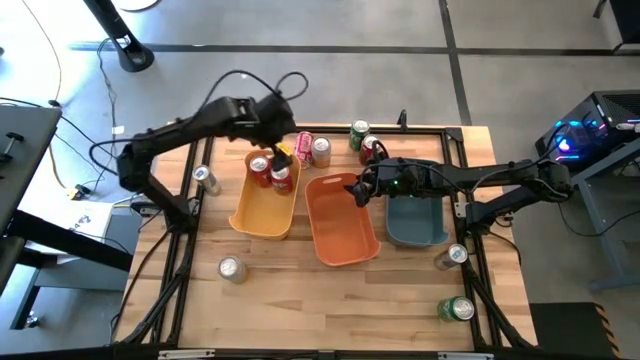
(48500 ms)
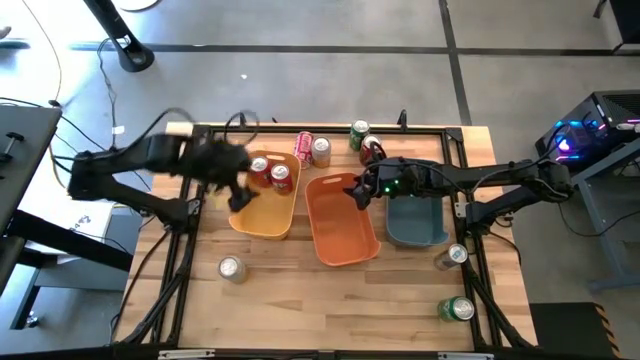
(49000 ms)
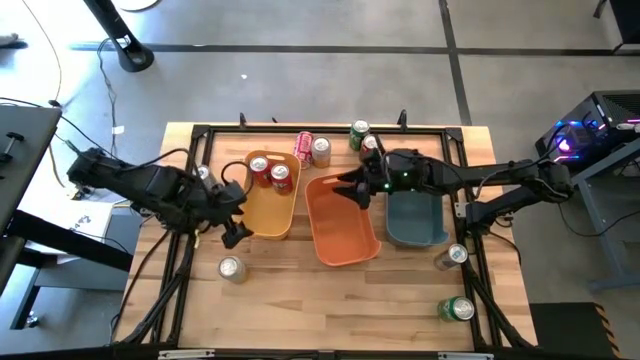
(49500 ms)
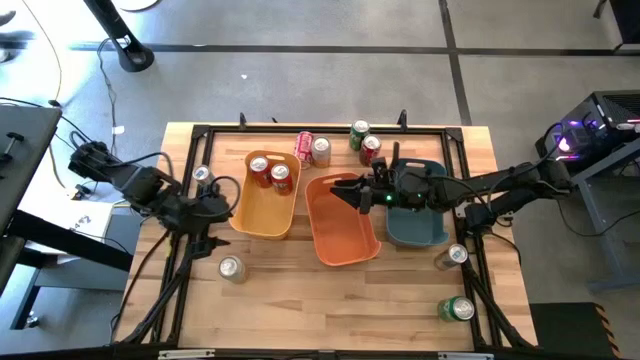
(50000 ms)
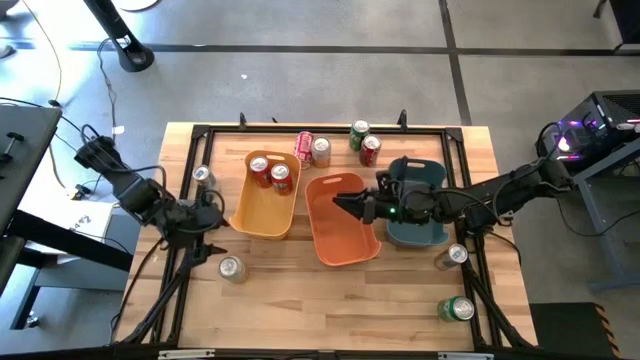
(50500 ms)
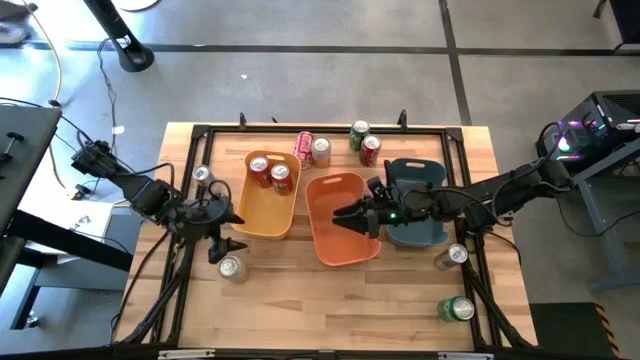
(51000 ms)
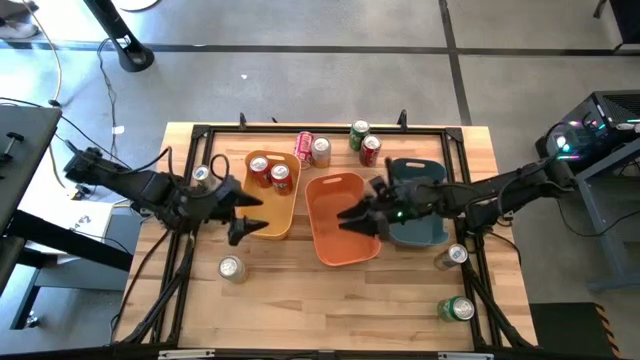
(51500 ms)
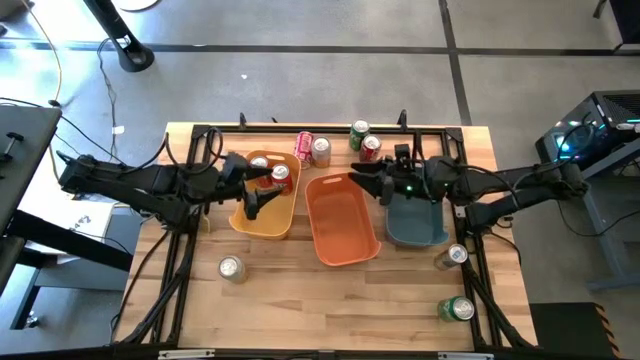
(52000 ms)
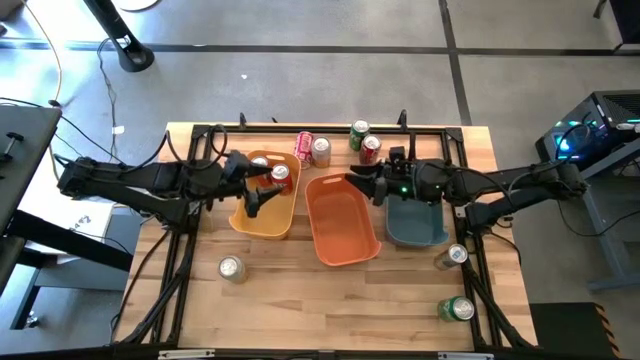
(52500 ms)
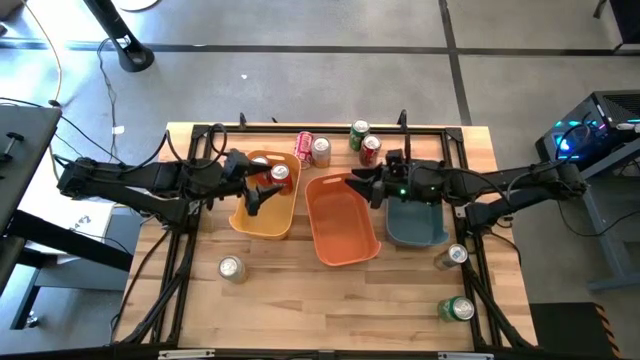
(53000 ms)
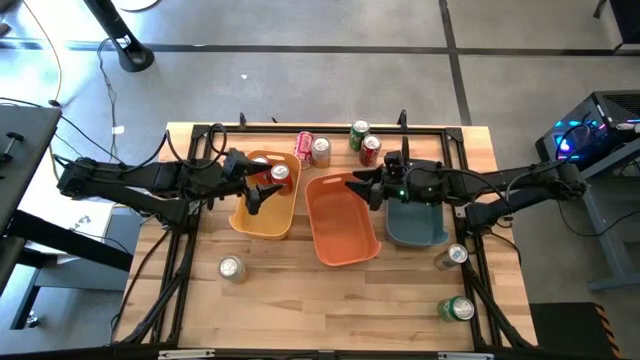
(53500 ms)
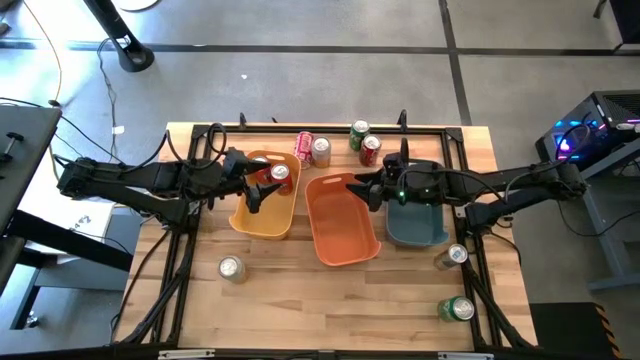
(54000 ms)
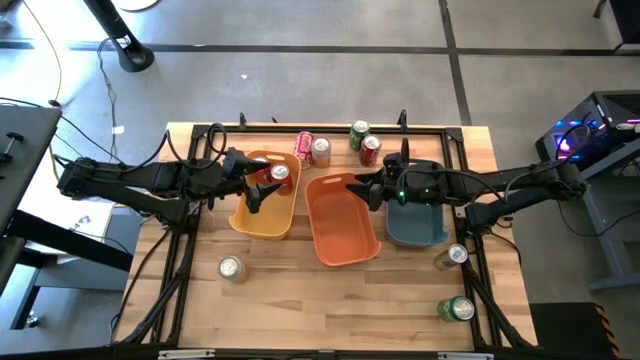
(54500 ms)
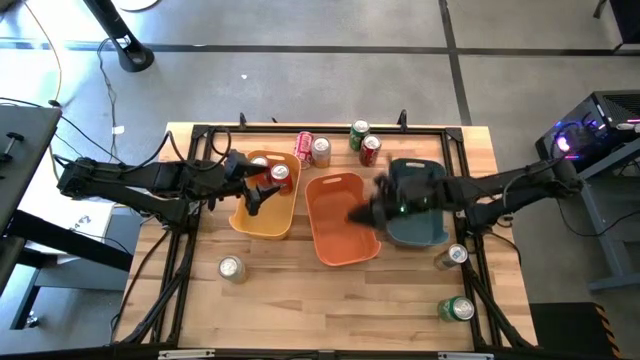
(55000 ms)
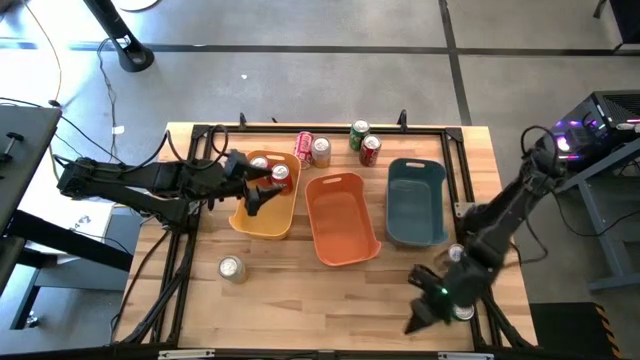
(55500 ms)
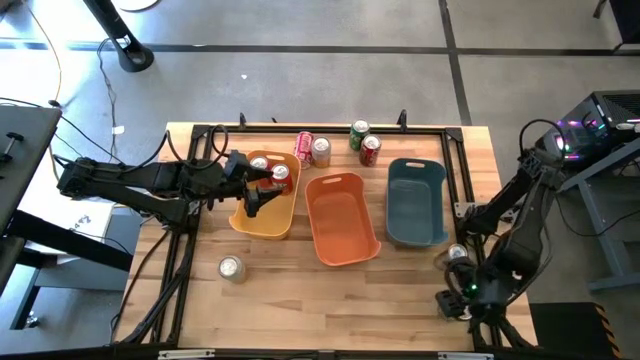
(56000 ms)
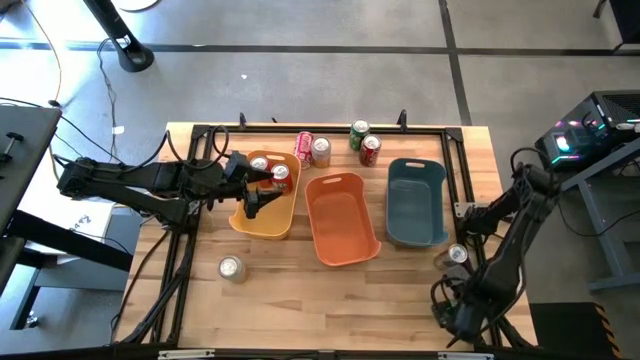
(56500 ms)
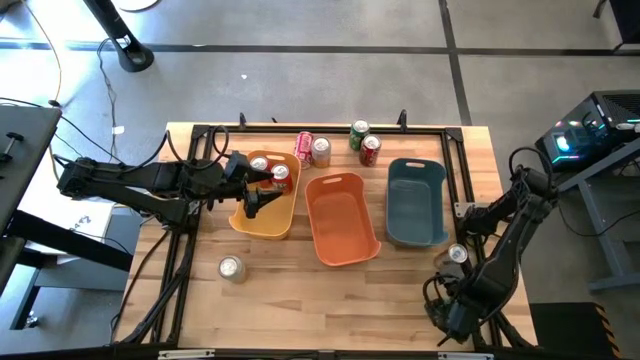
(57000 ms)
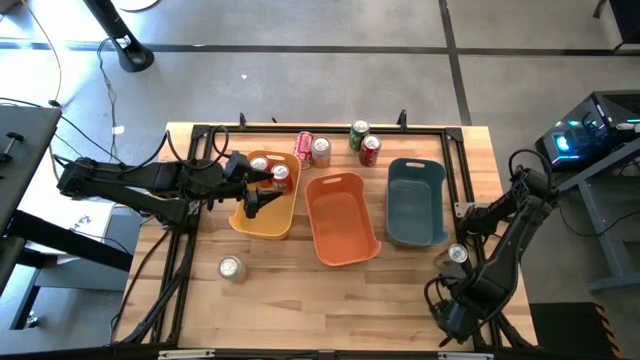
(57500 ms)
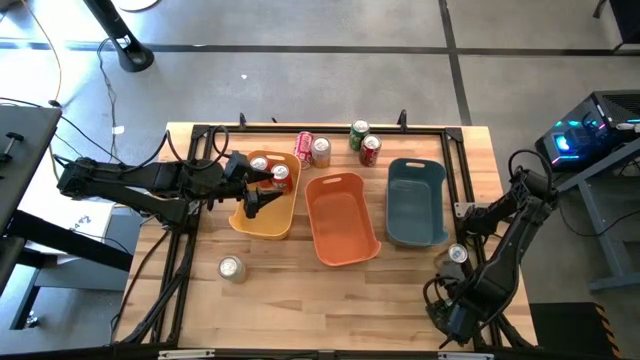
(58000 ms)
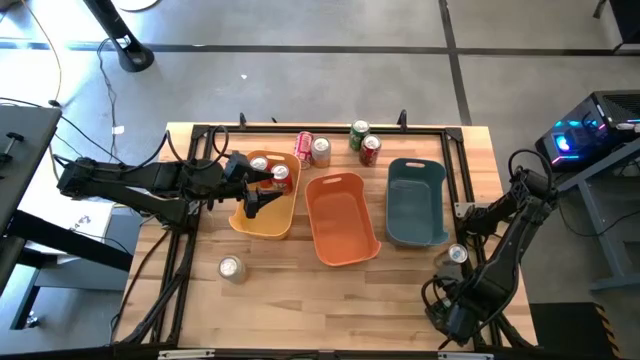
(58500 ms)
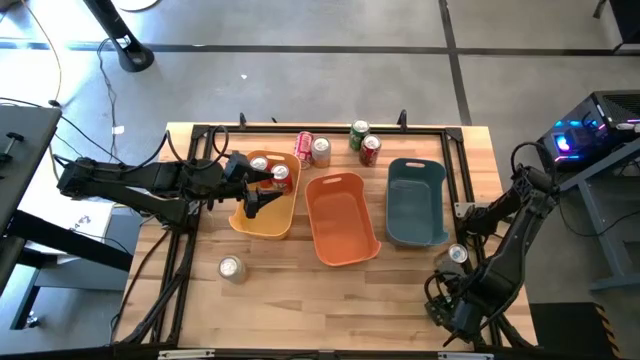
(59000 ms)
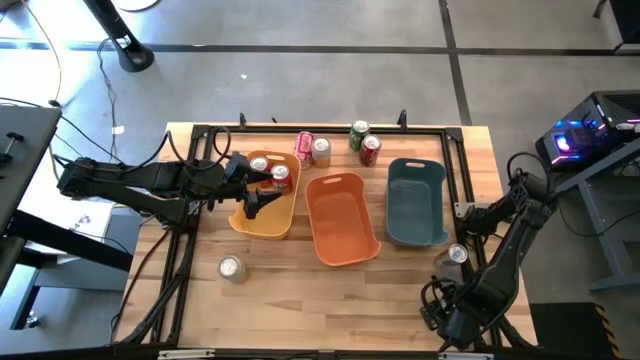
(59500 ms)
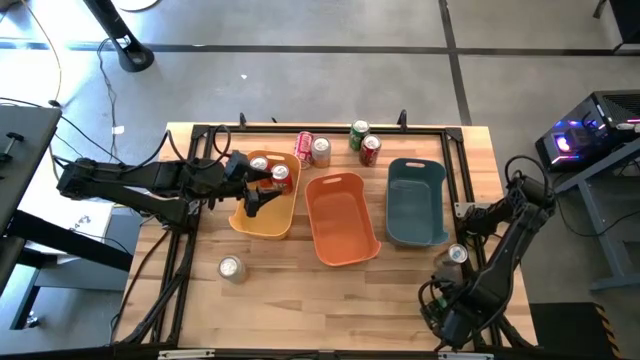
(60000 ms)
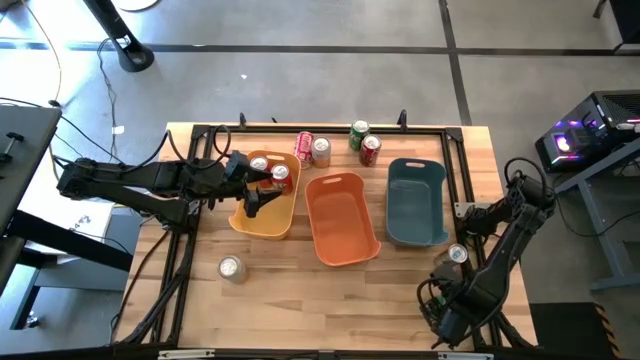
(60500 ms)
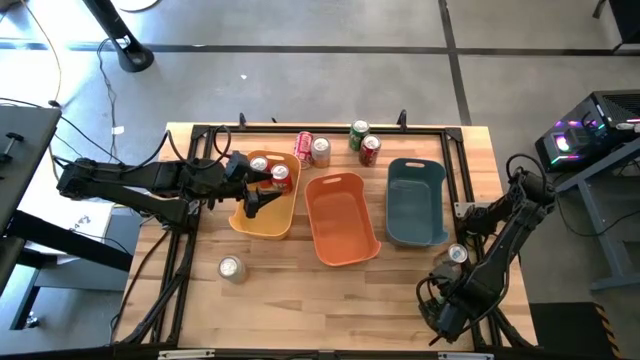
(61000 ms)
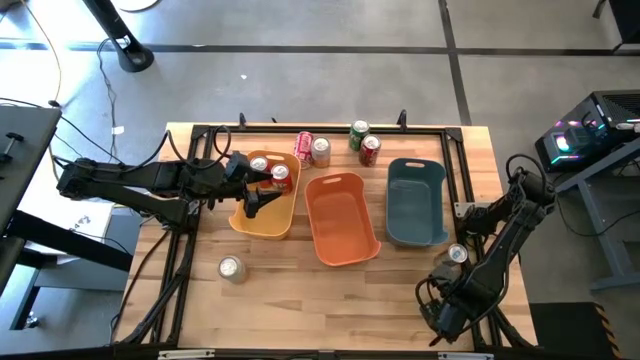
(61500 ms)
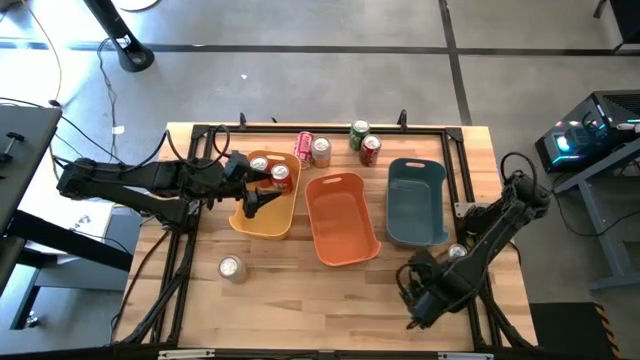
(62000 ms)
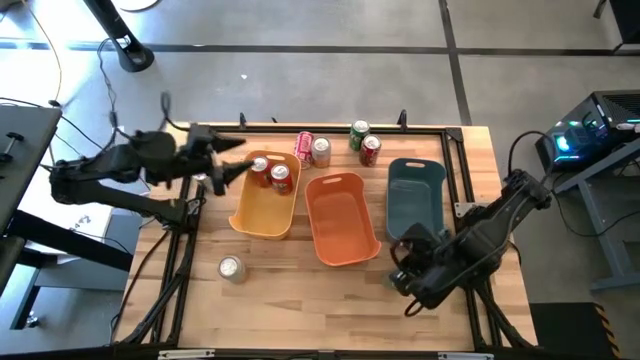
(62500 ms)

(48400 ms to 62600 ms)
Task: Sort soda cans
Put the bottom green soda can into the yellow bin

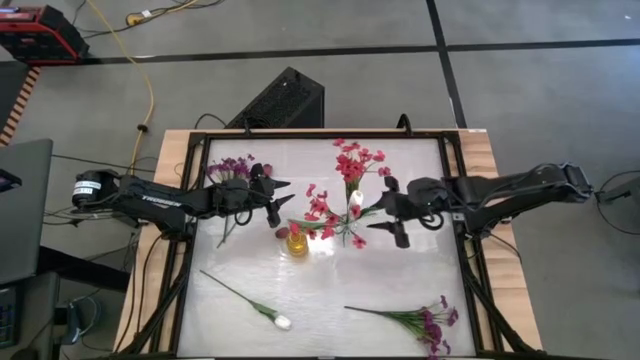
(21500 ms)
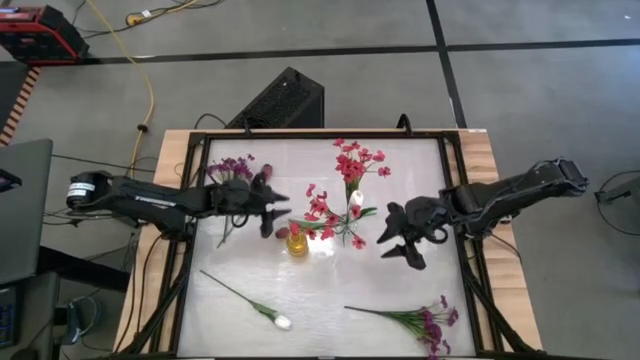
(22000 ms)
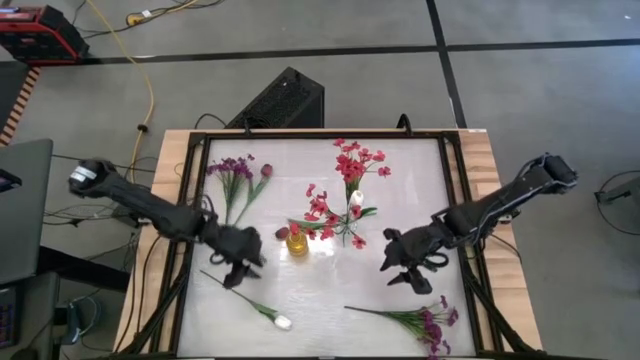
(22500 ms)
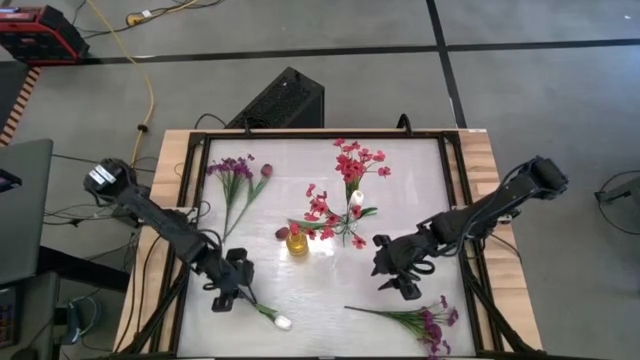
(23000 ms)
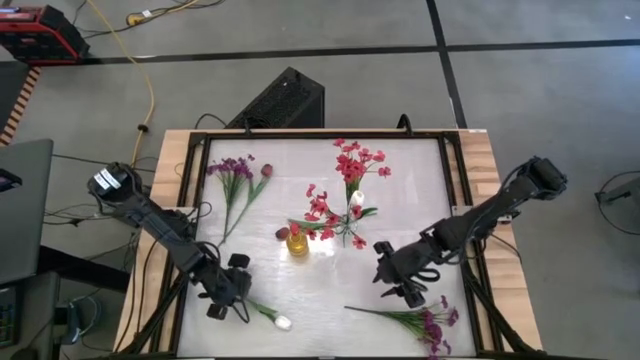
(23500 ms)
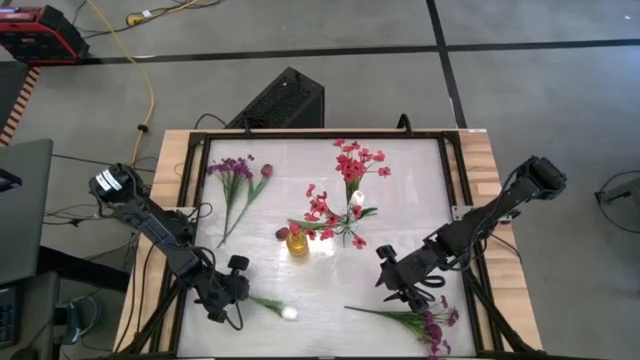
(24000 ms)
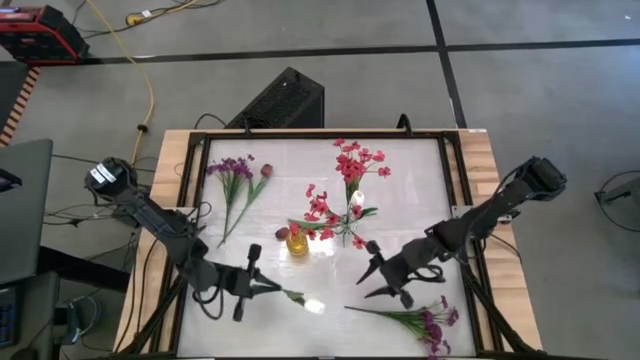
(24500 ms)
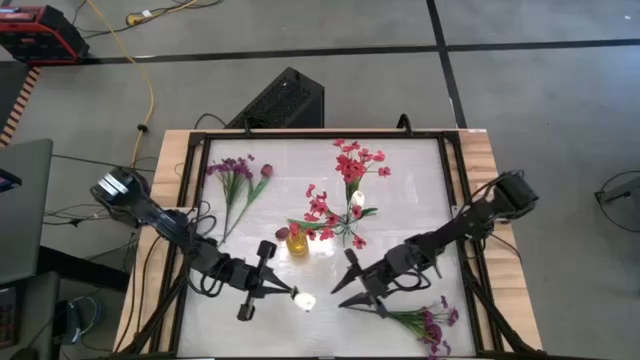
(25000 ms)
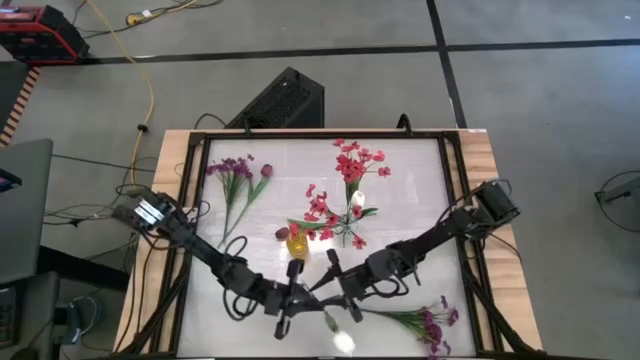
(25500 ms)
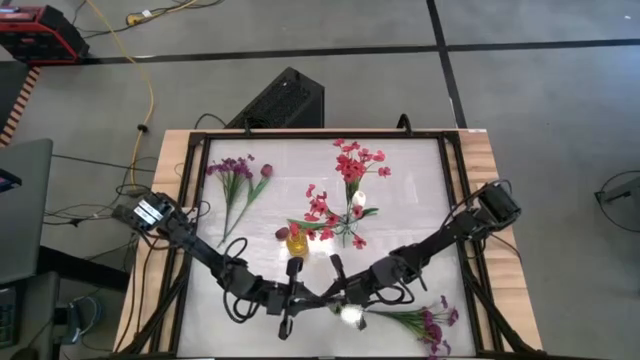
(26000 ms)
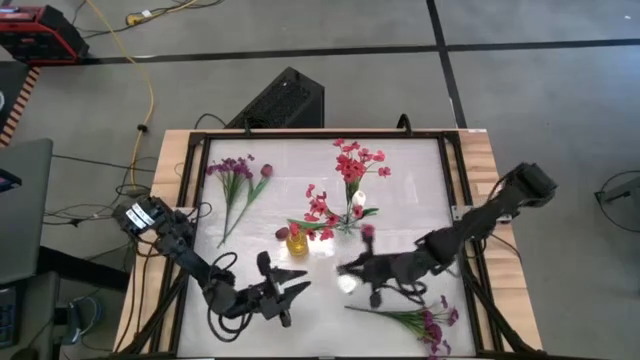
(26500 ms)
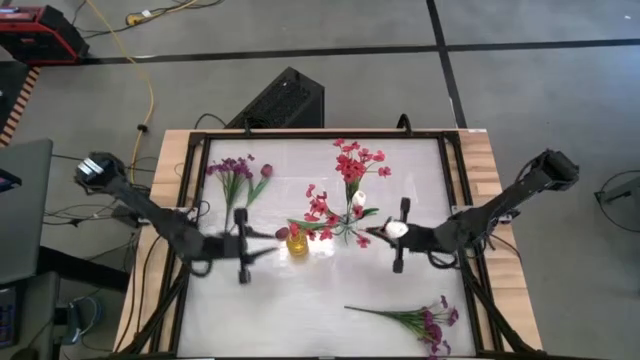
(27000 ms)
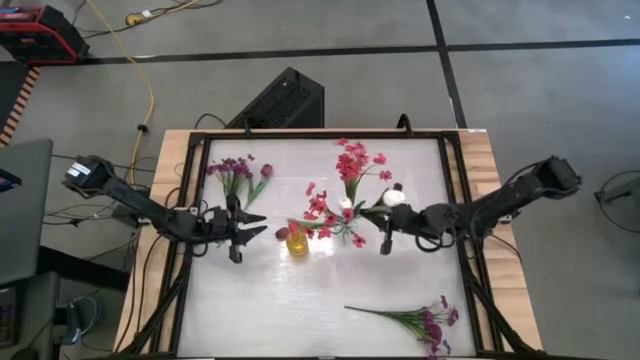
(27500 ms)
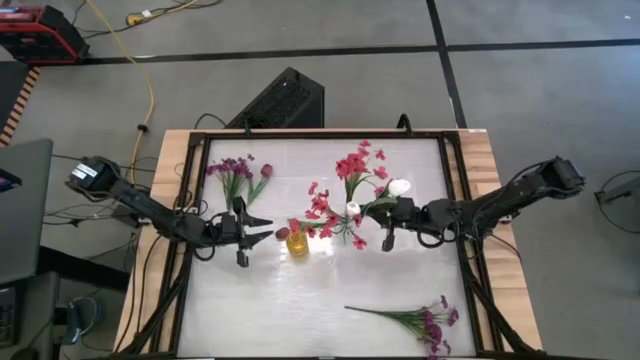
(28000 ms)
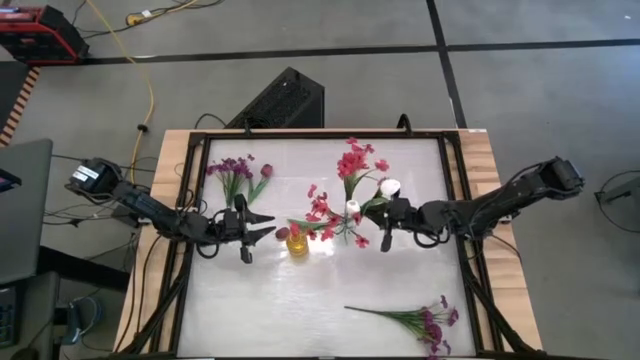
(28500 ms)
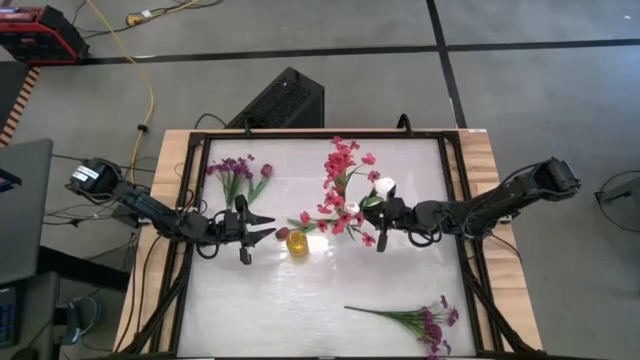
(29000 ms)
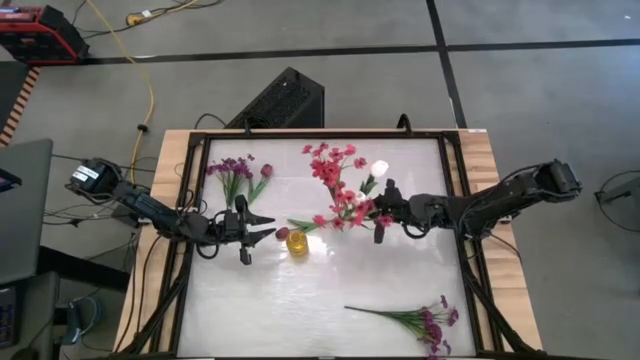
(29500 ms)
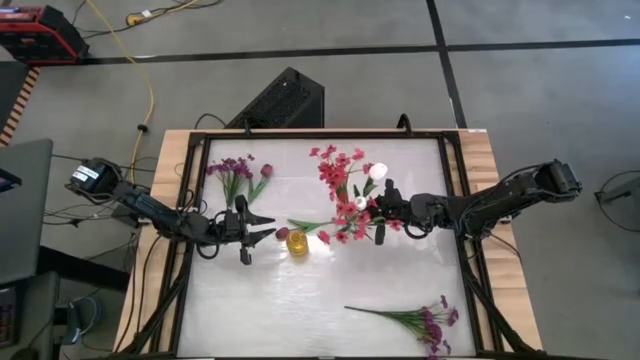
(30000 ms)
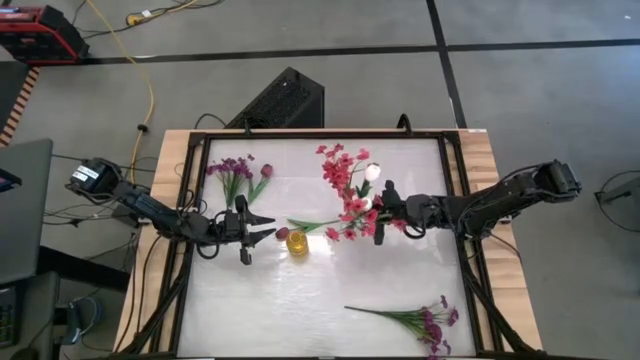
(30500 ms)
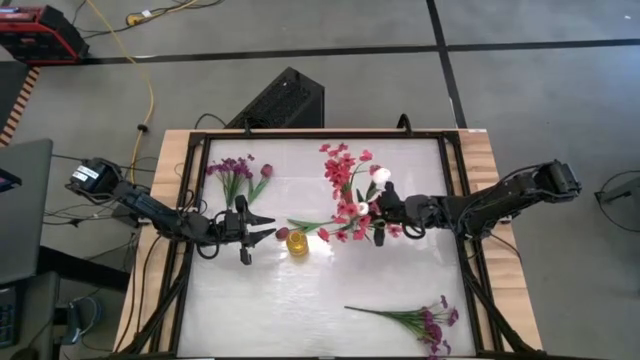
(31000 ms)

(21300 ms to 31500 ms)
Task: Sort flowers into vase by color
Put the white tulip into the transparent vase
